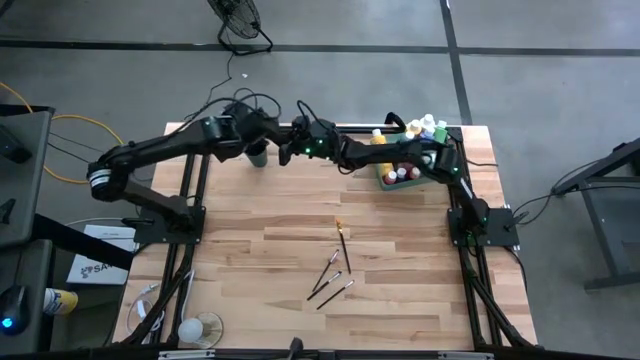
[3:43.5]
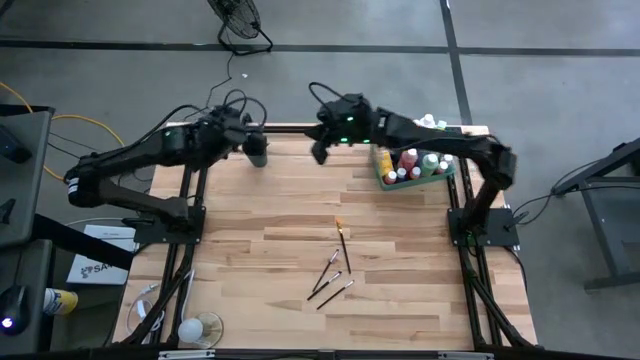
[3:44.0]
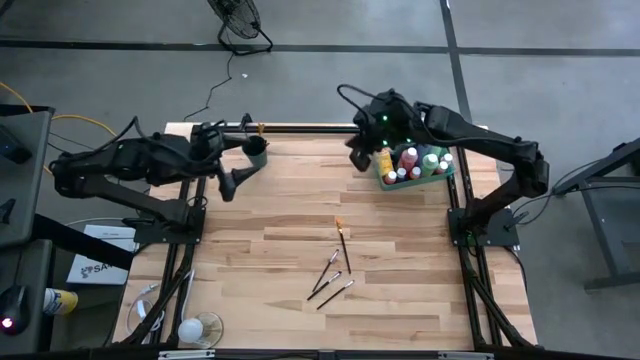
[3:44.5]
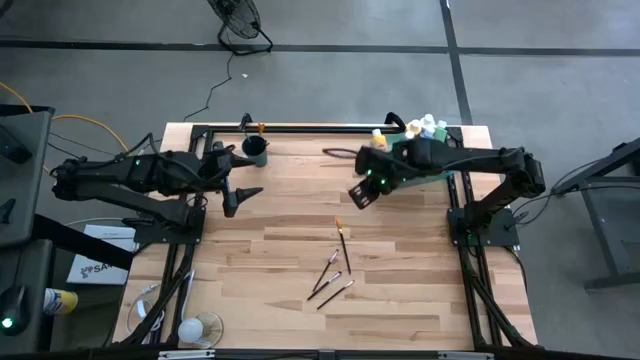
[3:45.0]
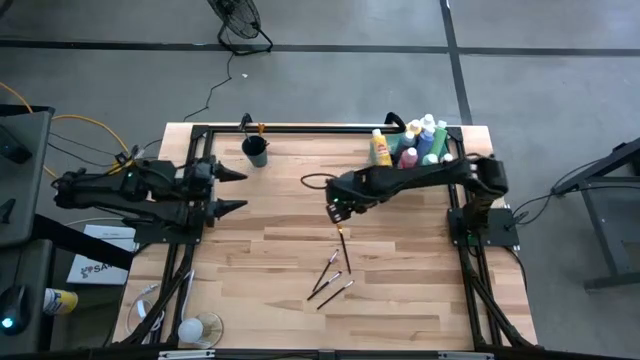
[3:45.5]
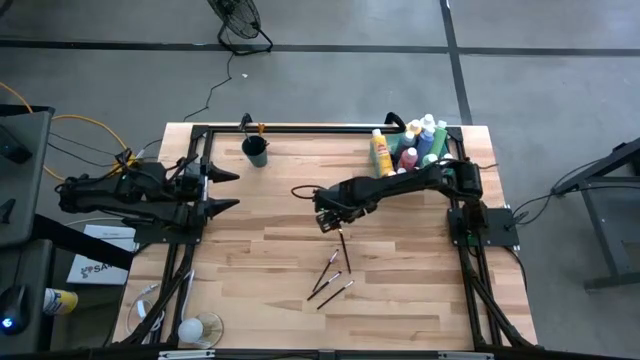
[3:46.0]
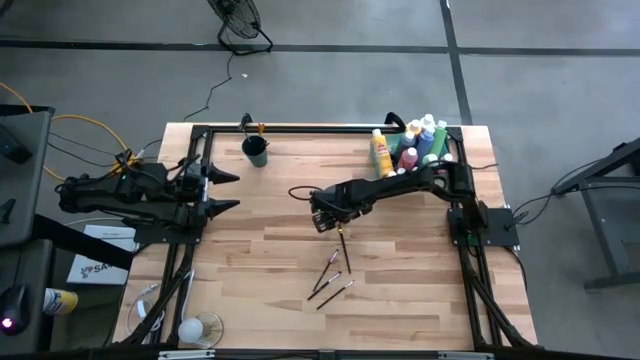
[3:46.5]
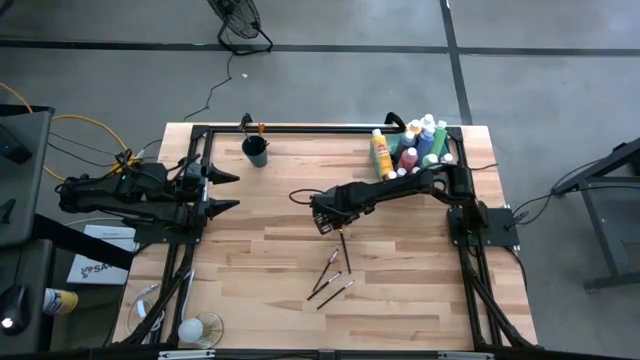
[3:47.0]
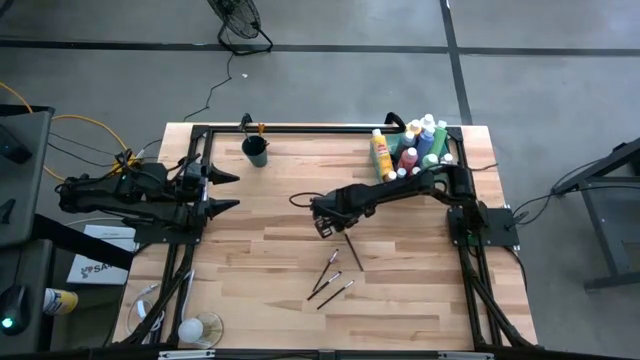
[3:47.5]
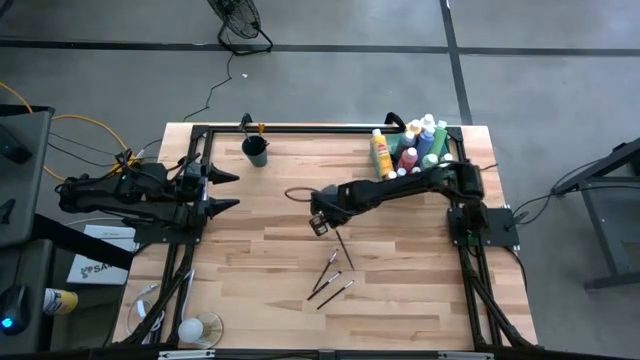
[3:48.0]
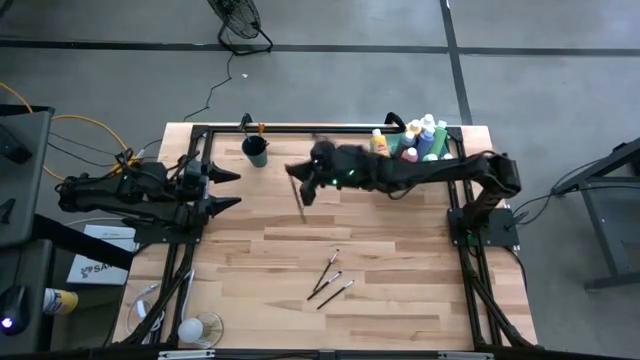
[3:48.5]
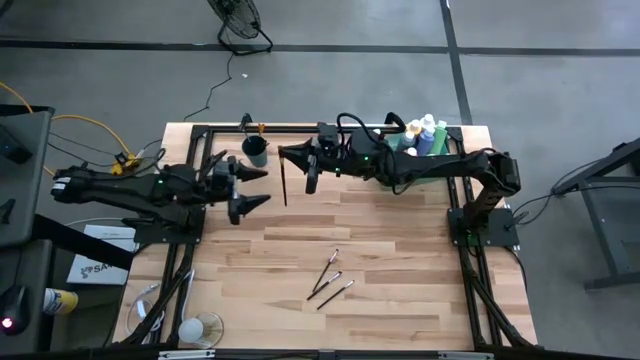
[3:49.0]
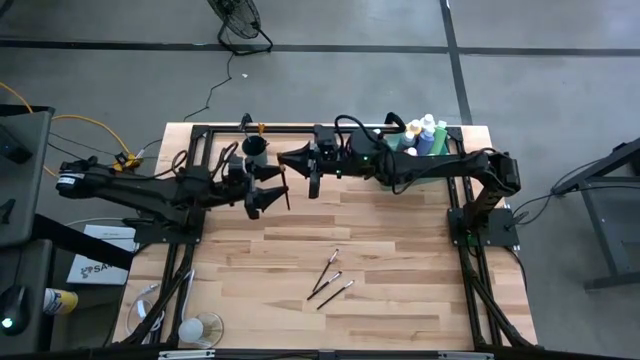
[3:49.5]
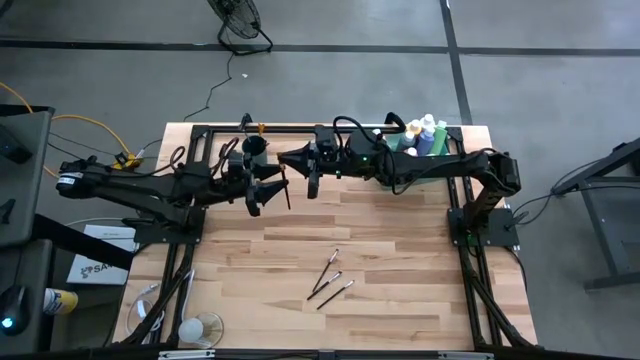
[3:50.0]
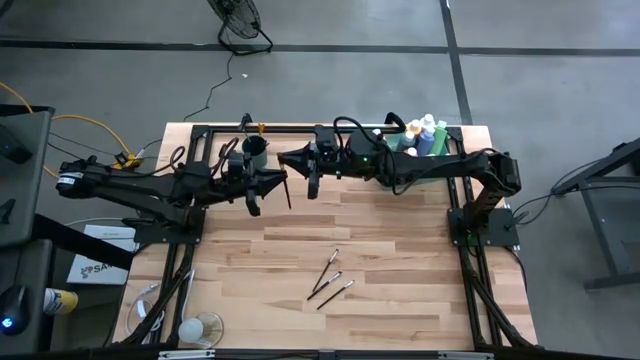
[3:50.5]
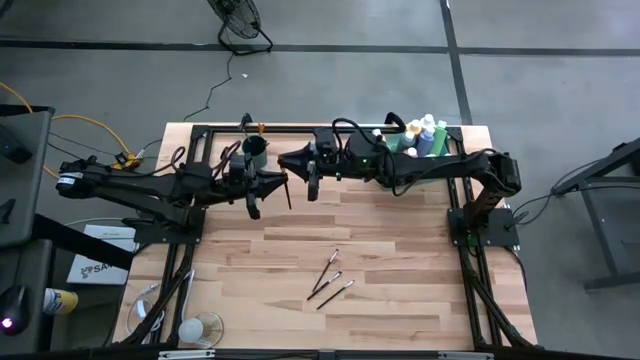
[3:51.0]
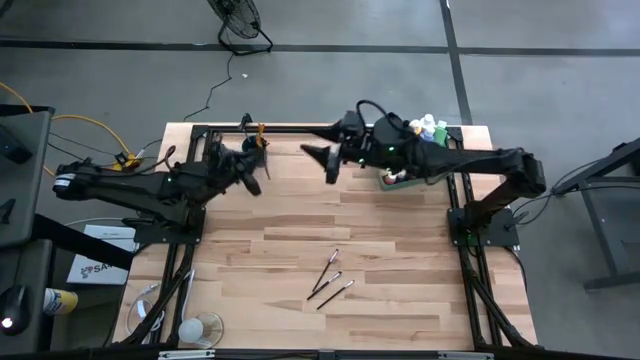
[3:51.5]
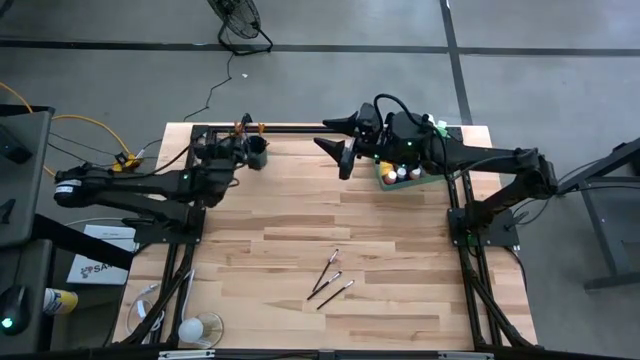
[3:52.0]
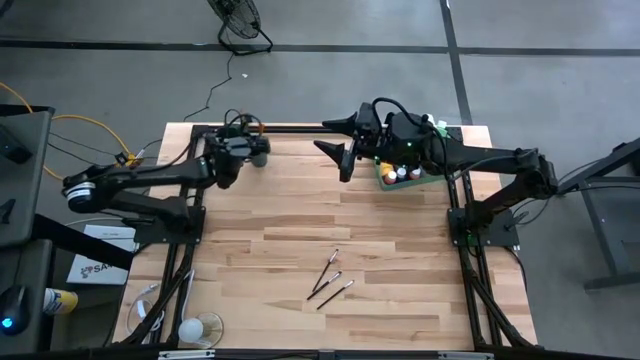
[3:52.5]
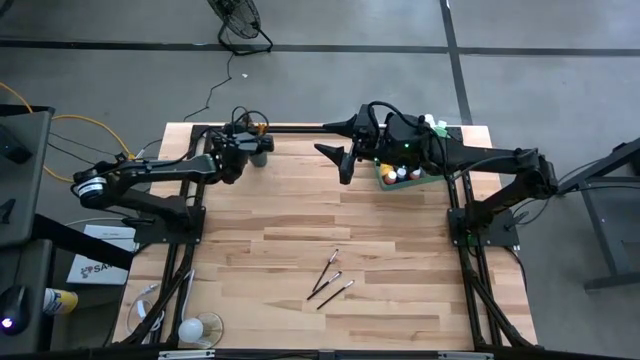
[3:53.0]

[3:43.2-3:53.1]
Task: Pick & Place Paint Supplies
Put the gold paintbrush into the blue cup

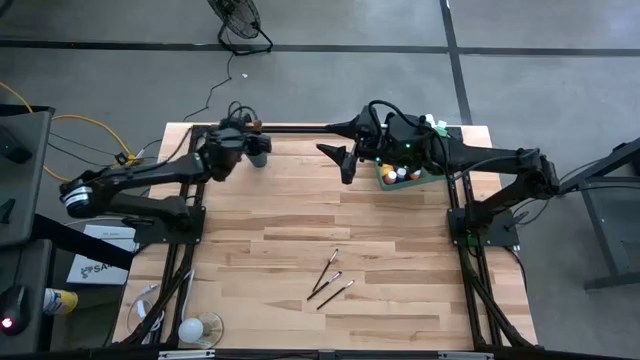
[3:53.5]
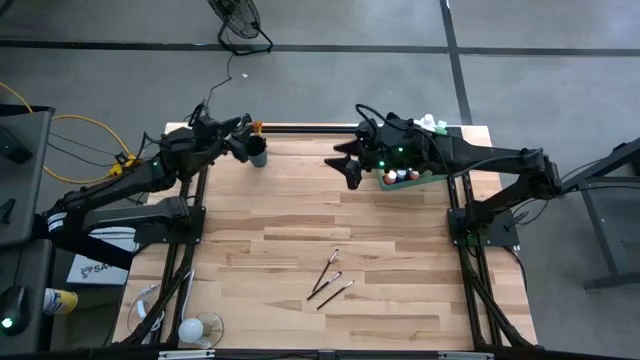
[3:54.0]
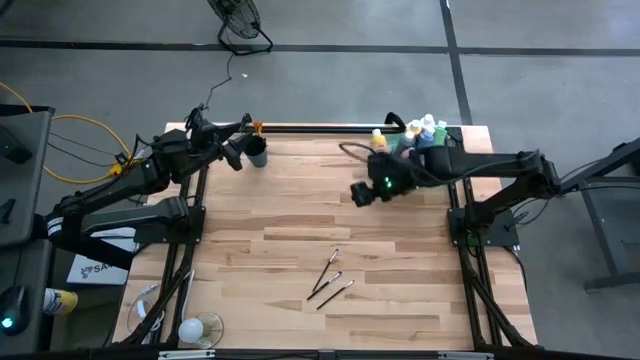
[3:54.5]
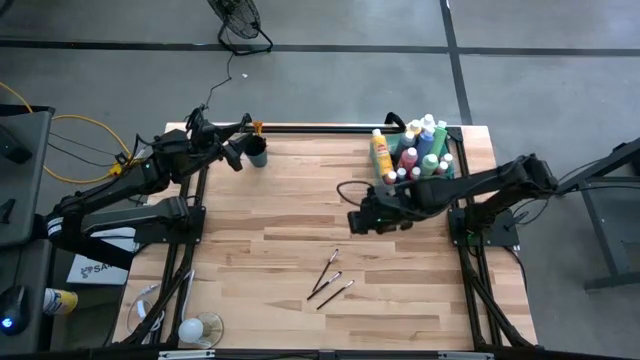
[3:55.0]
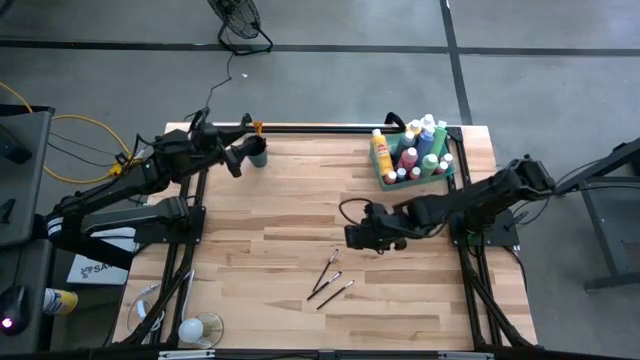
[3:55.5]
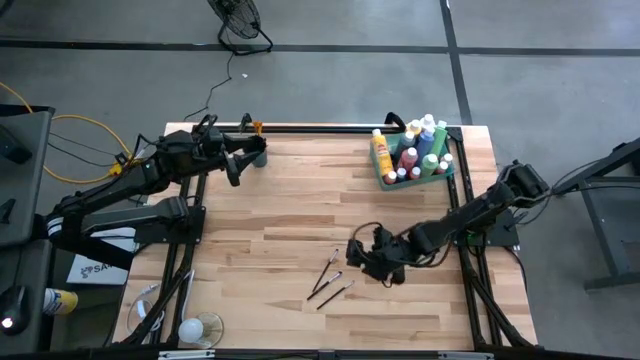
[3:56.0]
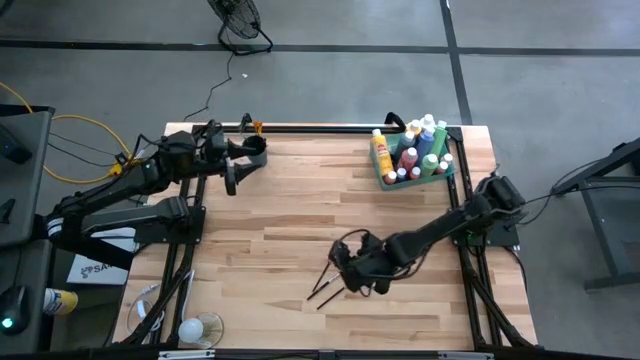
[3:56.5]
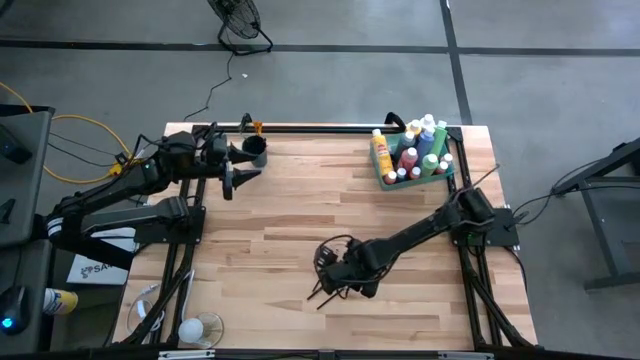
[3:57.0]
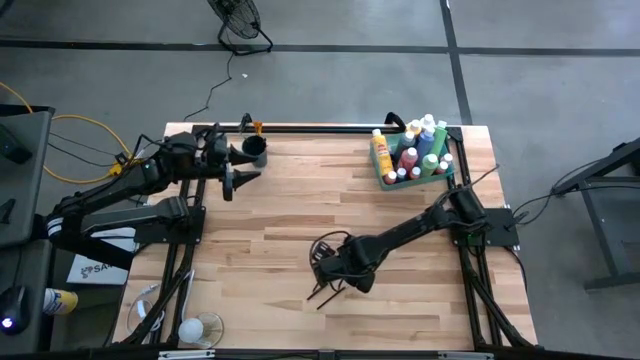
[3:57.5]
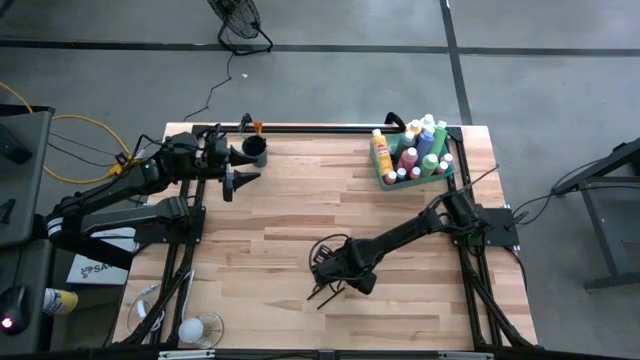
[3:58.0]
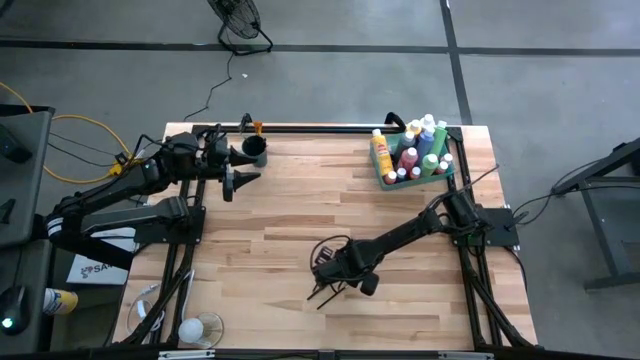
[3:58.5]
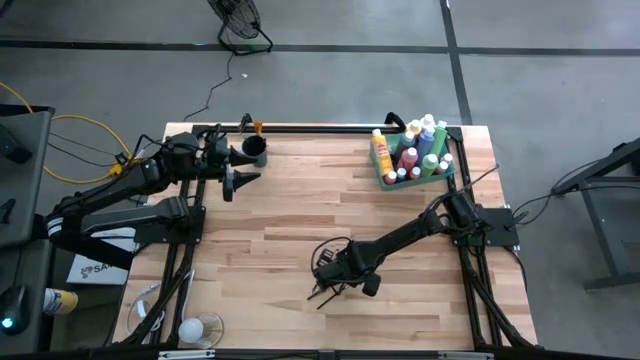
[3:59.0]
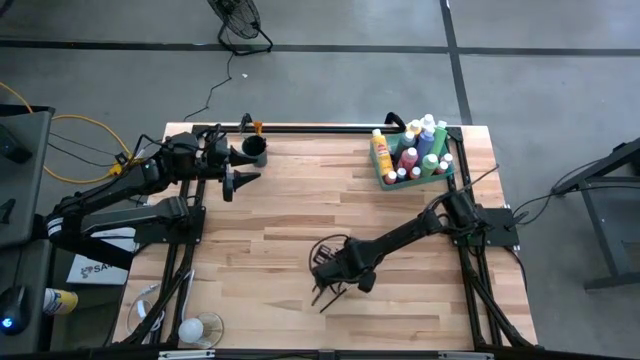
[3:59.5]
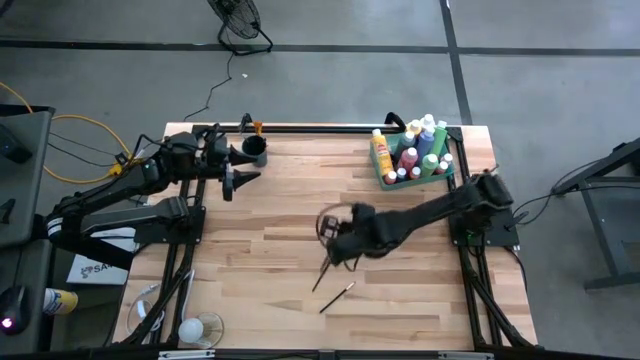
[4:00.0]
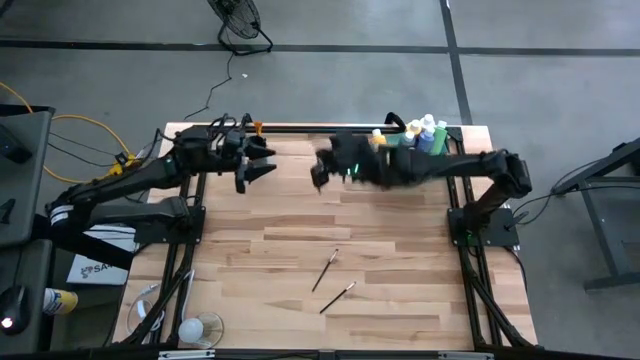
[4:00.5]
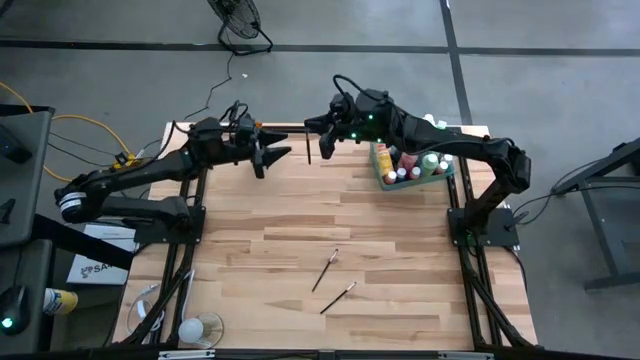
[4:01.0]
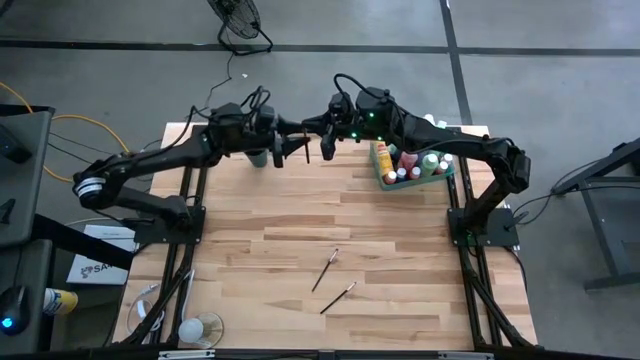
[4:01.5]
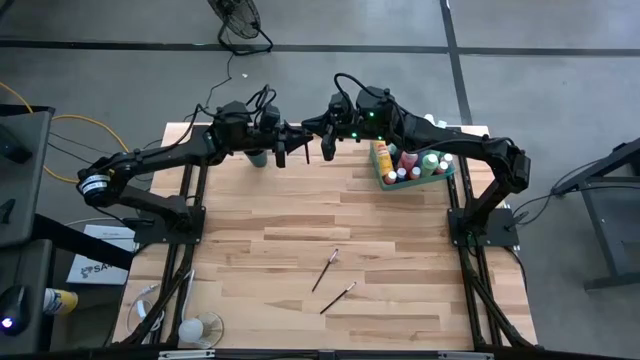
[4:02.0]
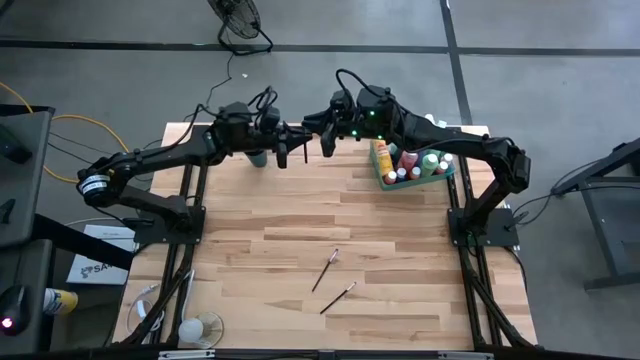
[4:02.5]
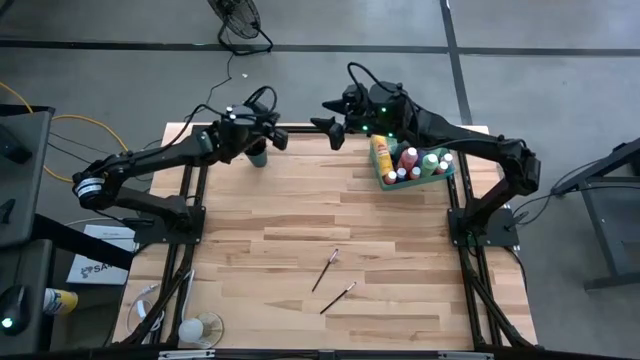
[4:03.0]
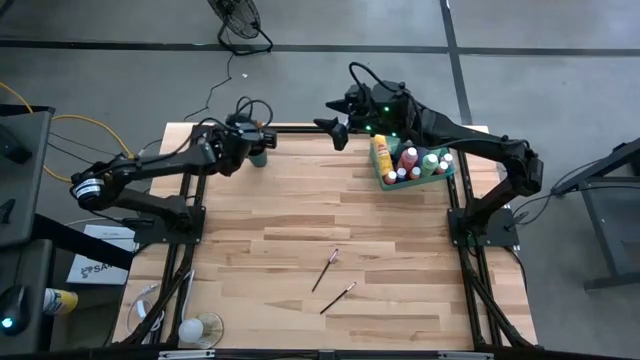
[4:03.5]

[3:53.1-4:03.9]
Put the silver paintbrush into the blue cup

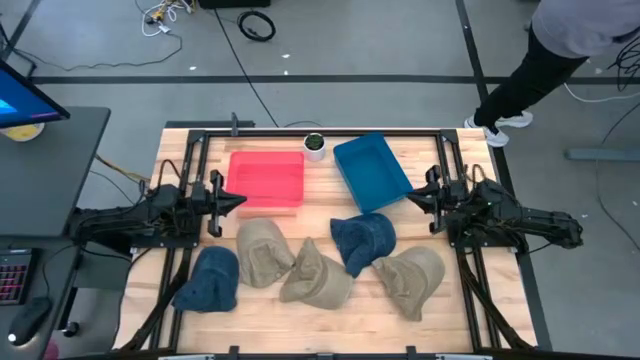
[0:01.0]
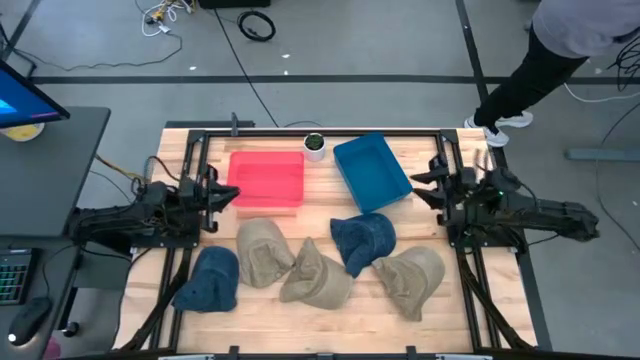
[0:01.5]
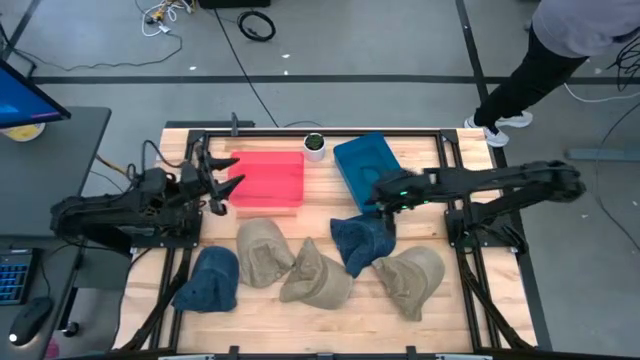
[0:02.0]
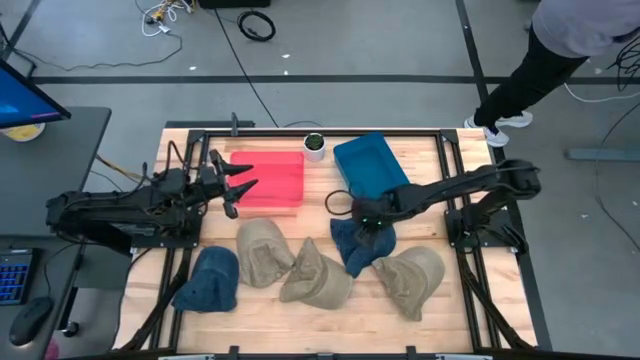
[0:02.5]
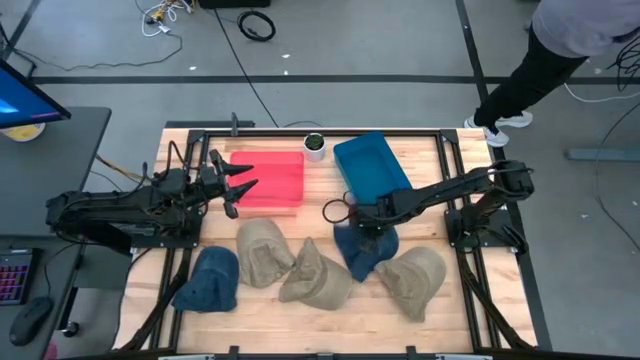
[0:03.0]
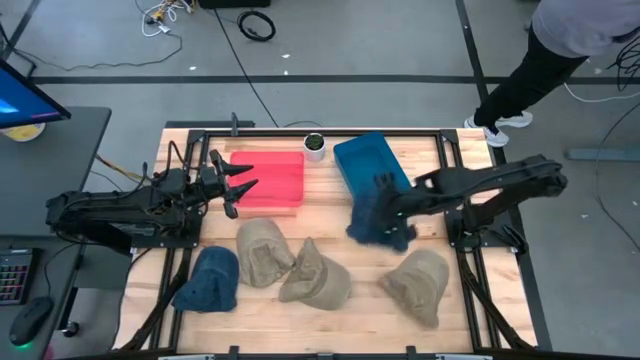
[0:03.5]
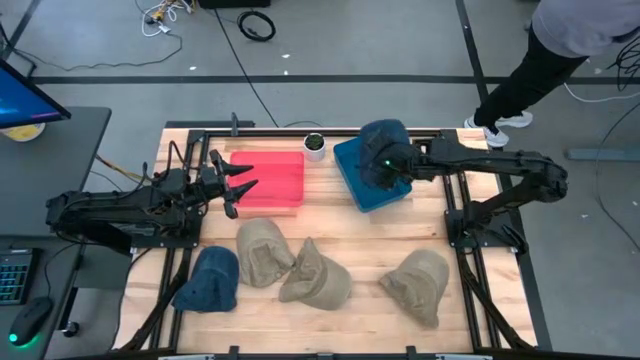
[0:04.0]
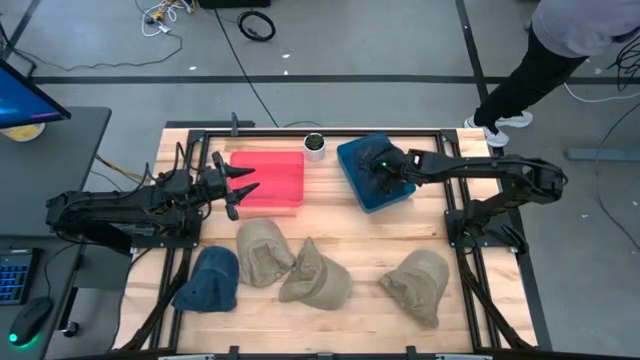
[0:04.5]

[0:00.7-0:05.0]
Task: Pick & Place hat
Put the right blue cap into the blue bin
